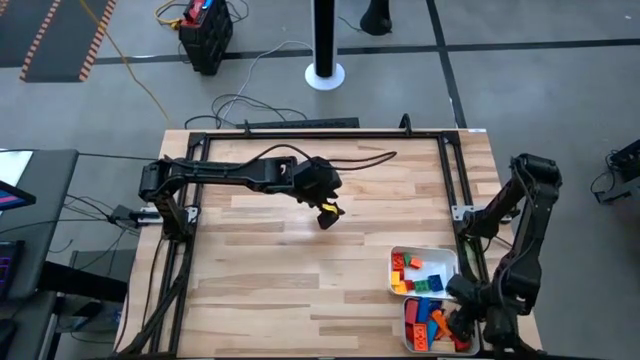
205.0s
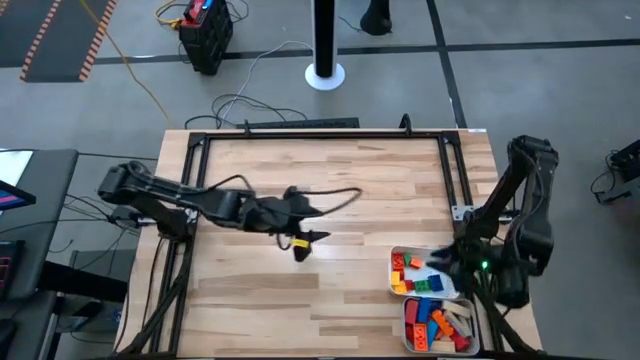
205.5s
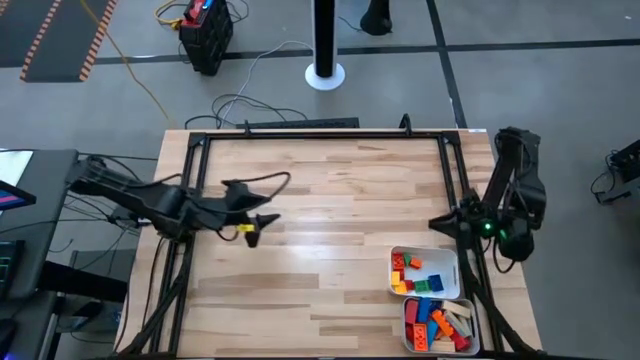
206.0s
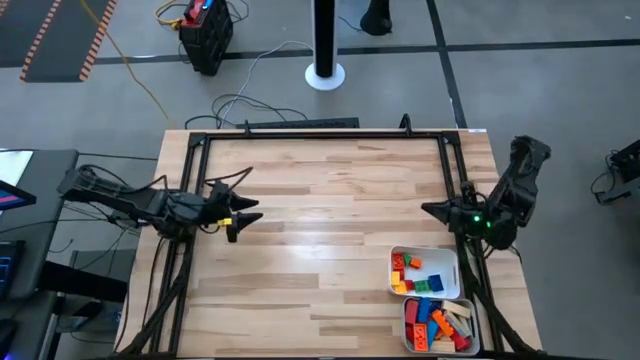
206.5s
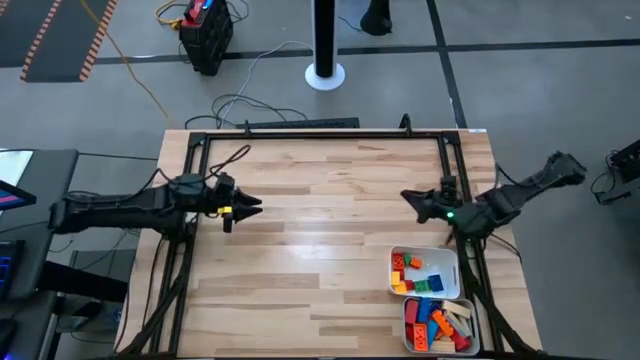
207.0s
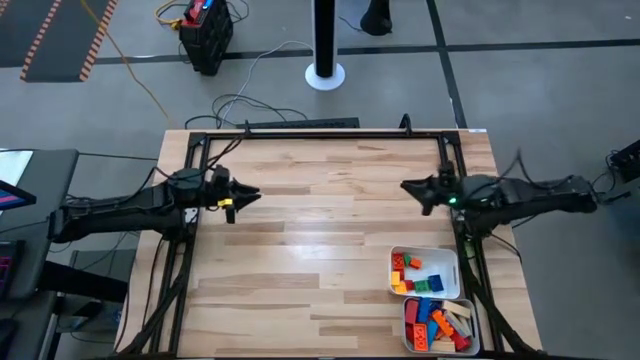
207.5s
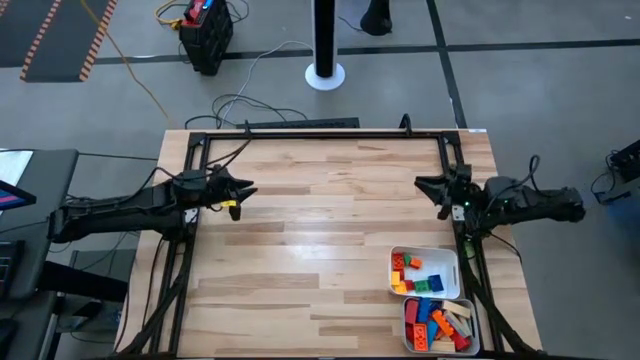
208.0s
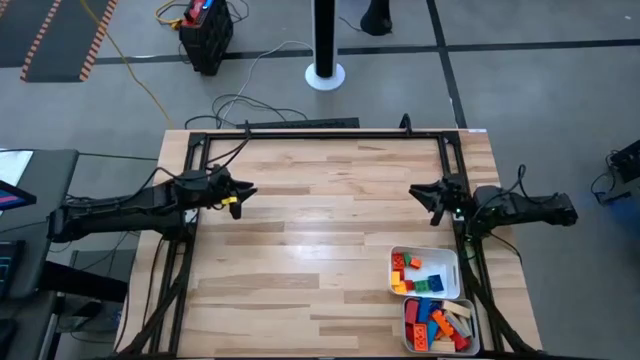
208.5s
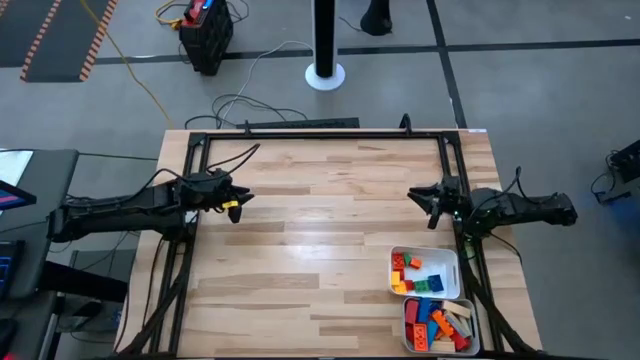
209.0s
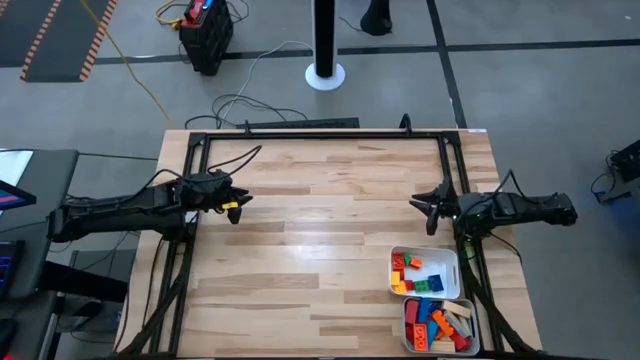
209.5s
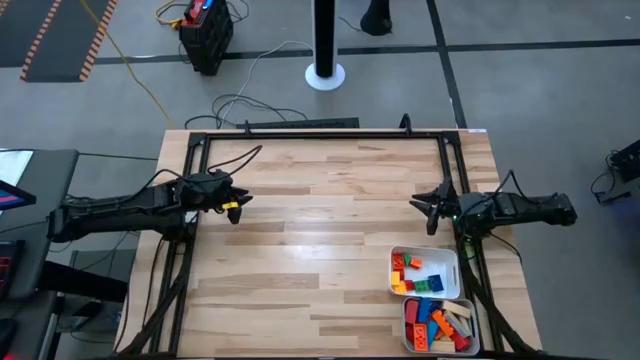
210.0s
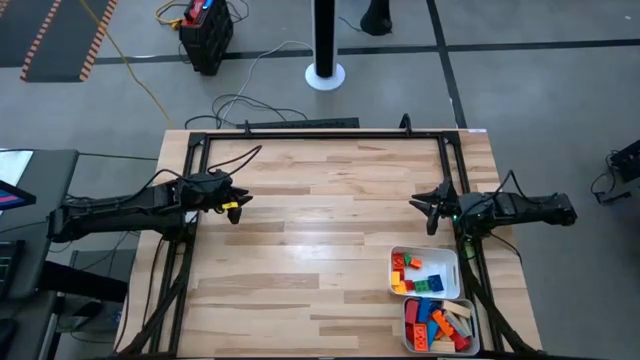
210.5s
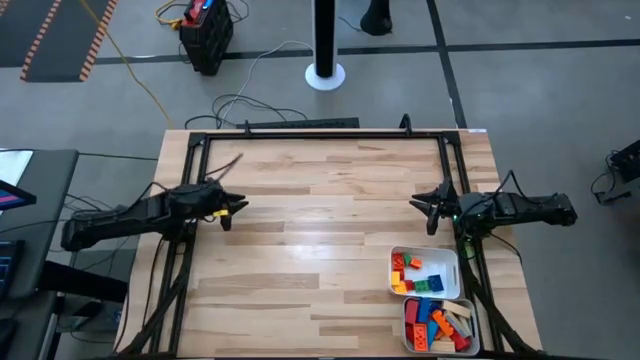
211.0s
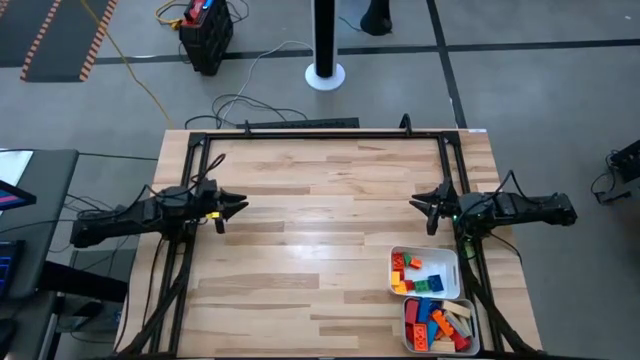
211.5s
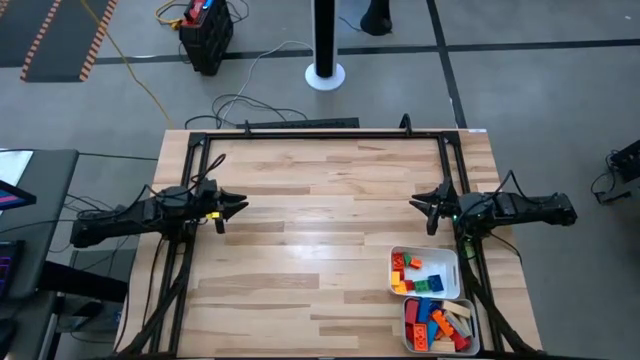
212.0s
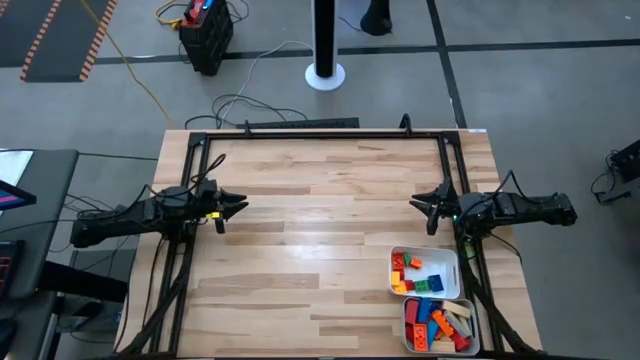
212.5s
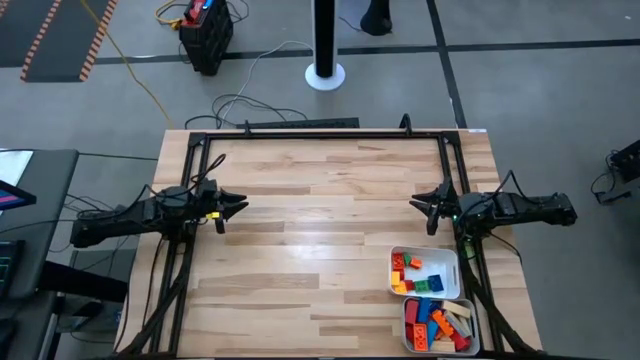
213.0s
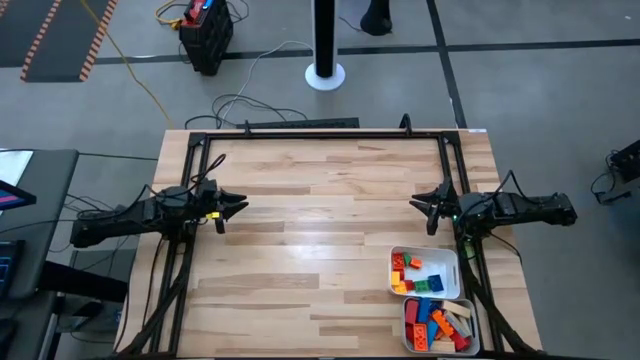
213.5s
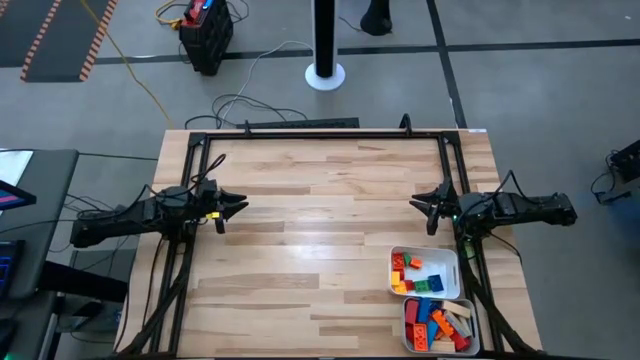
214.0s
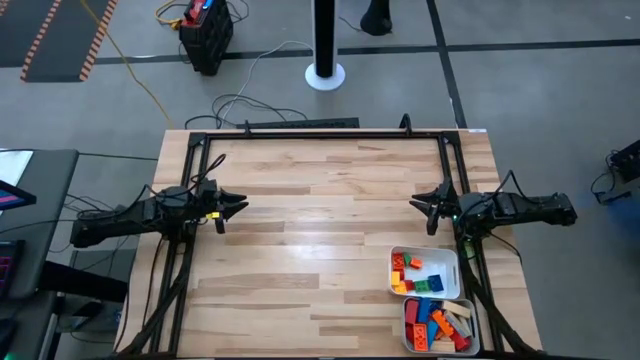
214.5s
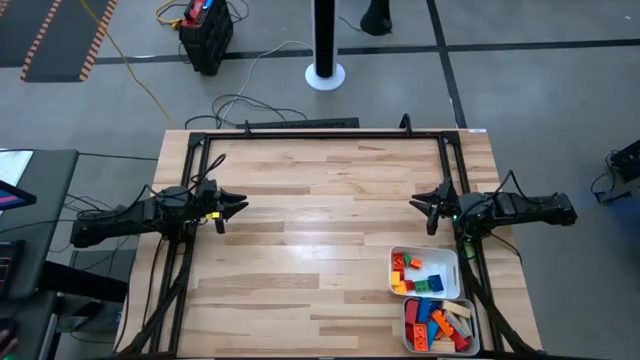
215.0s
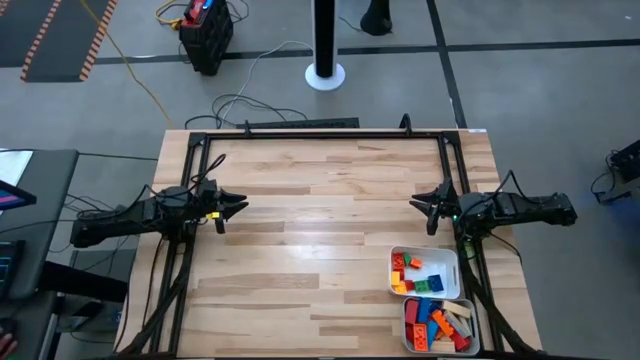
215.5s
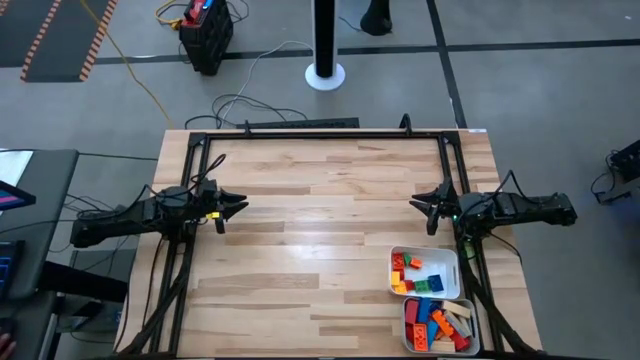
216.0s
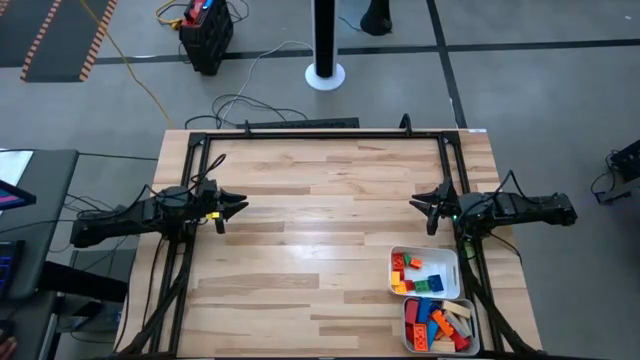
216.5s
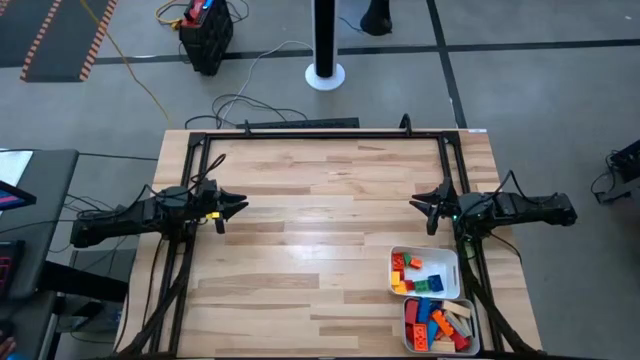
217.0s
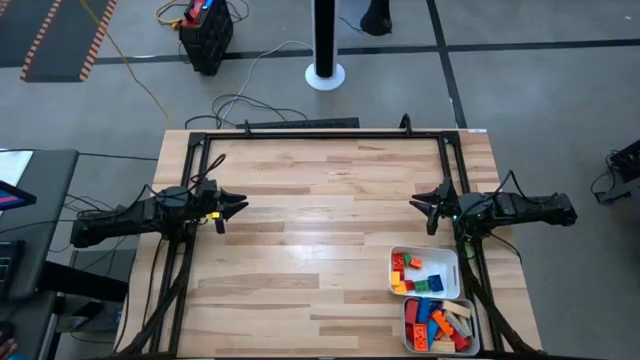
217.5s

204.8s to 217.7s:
Task: Sort blocks by size
Return to Home Position

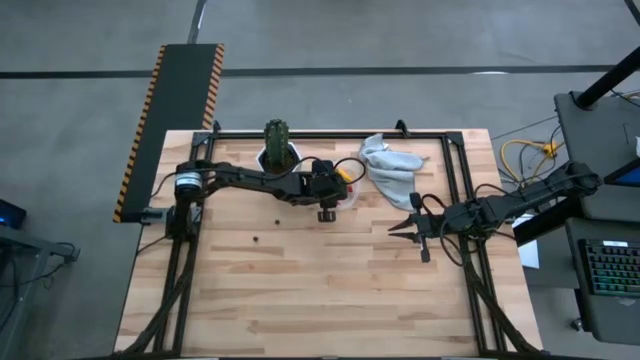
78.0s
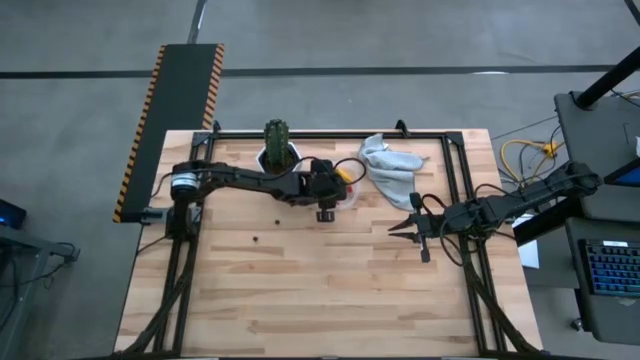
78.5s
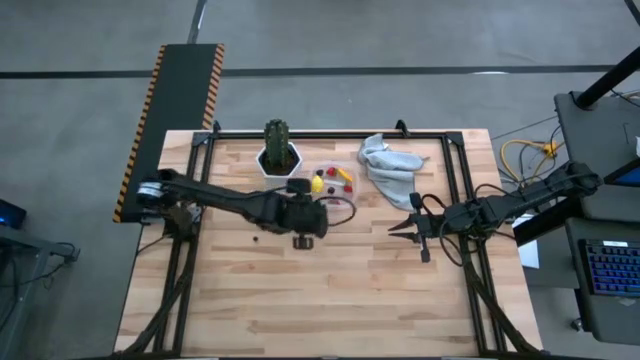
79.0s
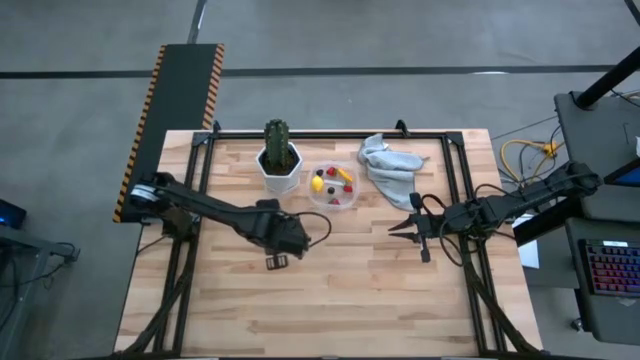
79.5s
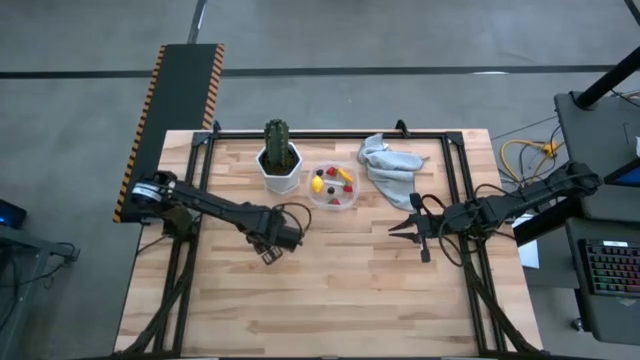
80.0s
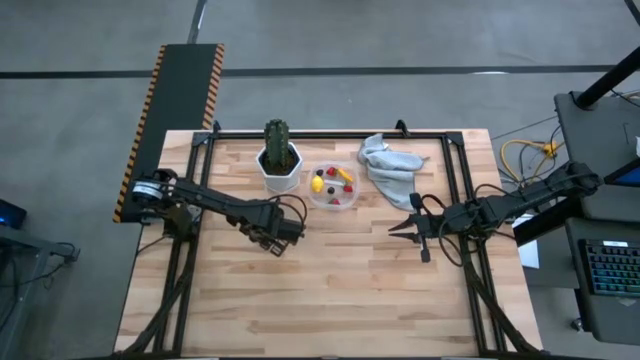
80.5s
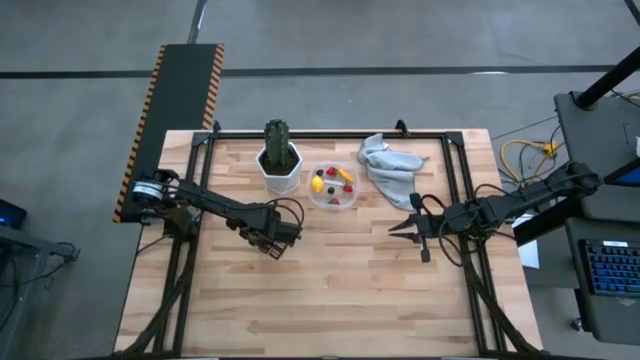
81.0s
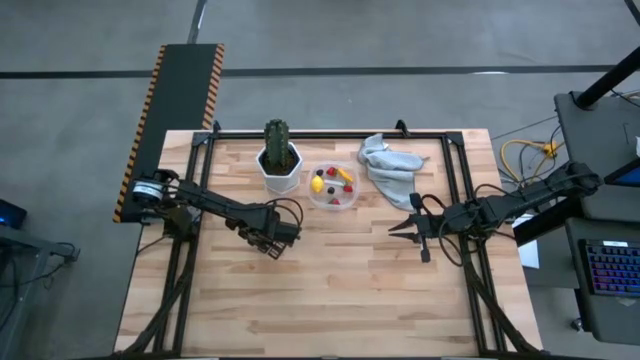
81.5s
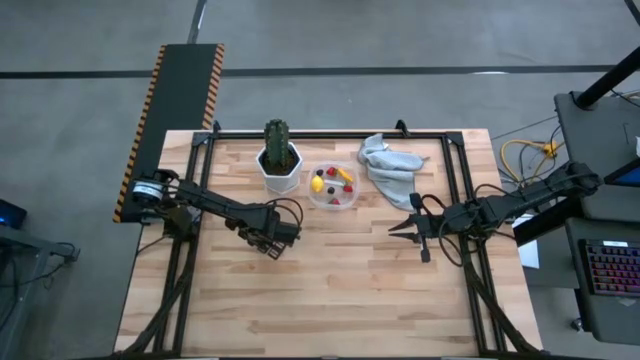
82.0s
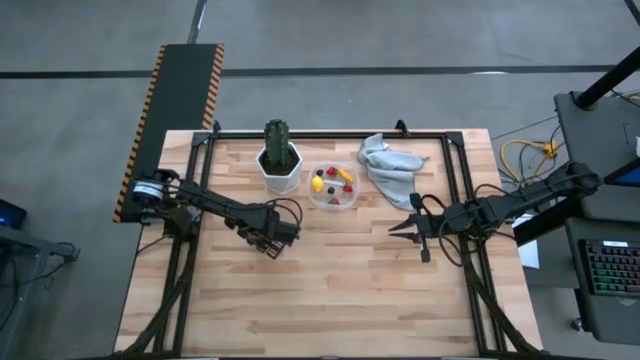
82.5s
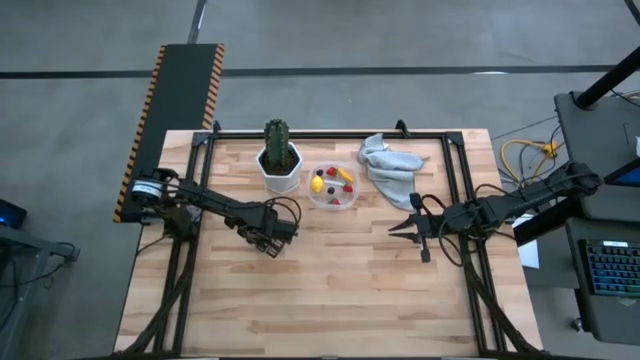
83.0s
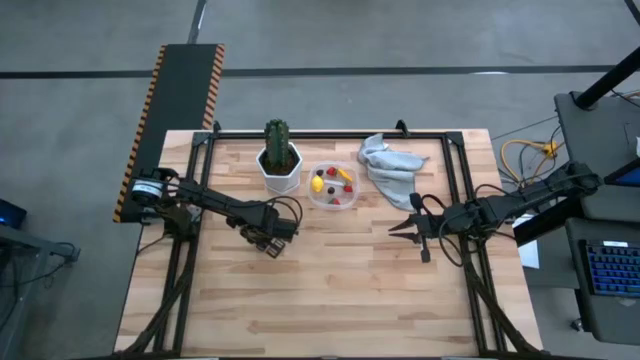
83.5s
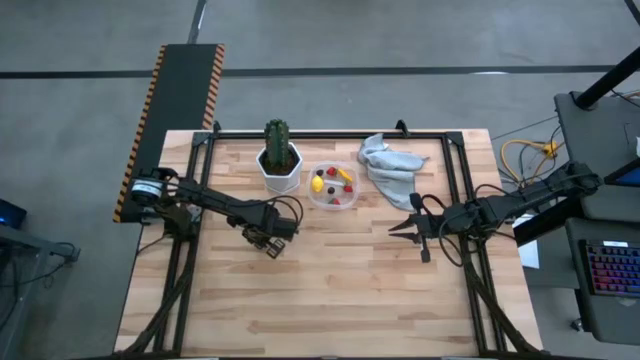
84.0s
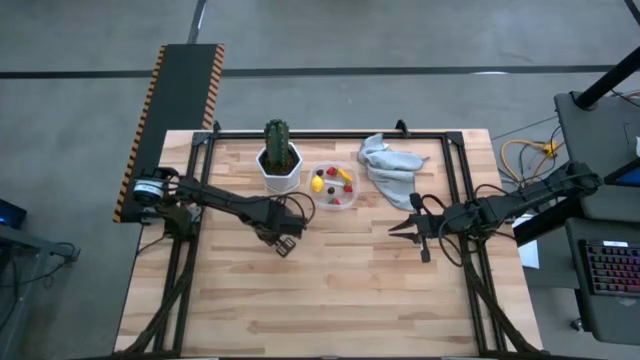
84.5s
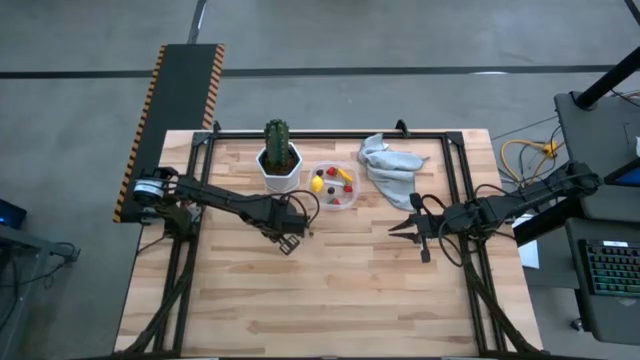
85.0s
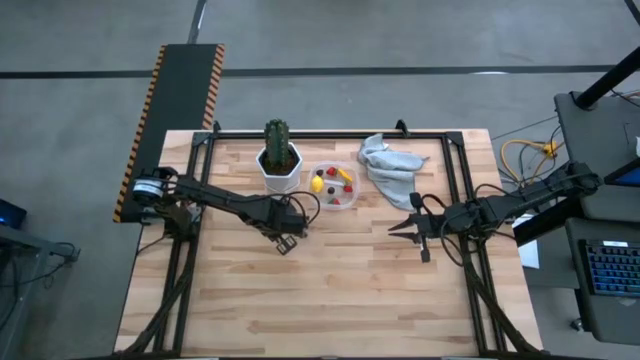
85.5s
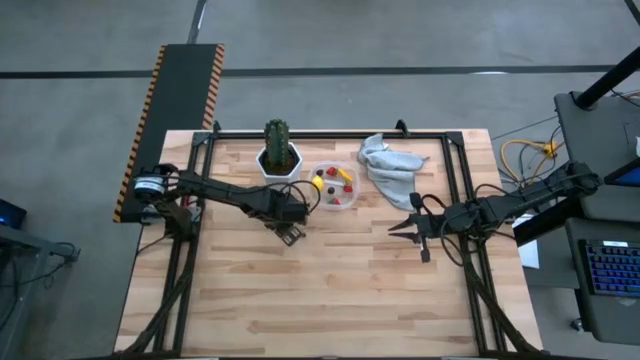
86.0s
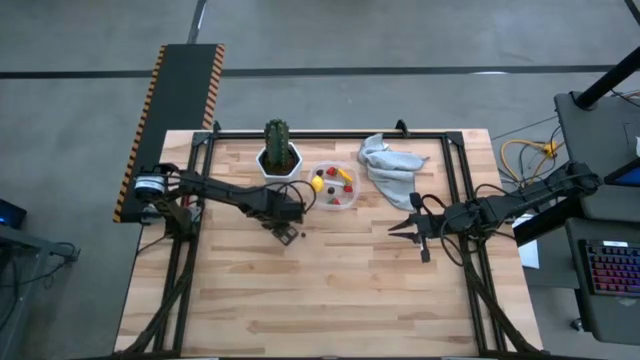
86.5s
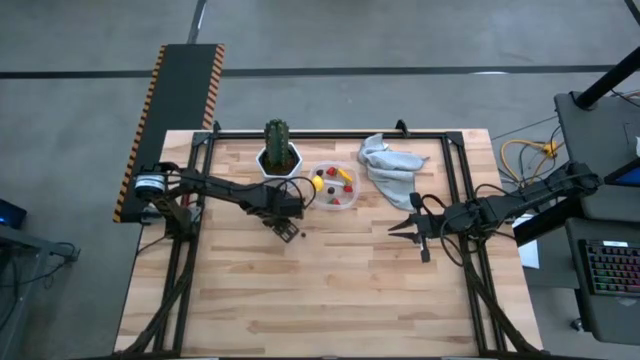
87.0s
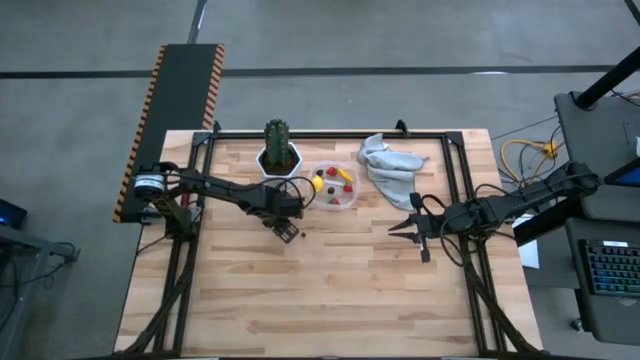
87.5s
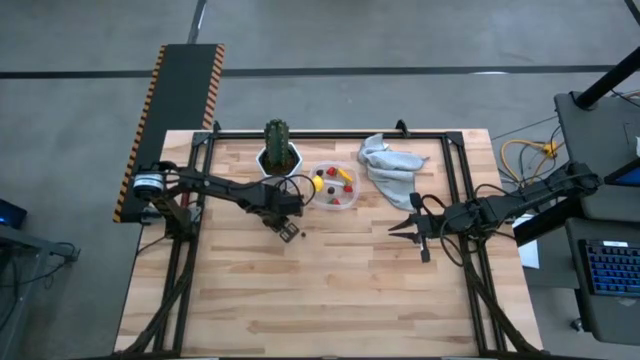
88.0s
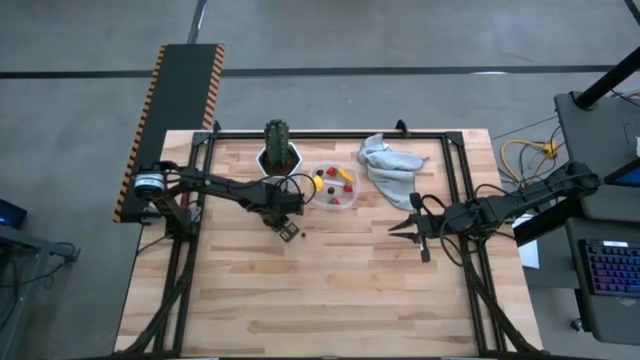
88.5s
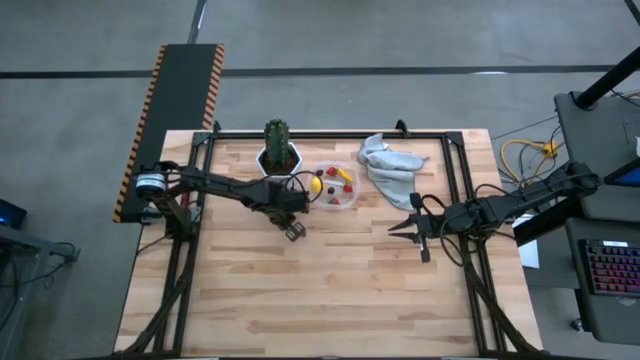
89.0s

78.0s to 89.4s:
Task: Pick and placing Produce into tupperware
Put the bottom blueberries into the transparent bin
